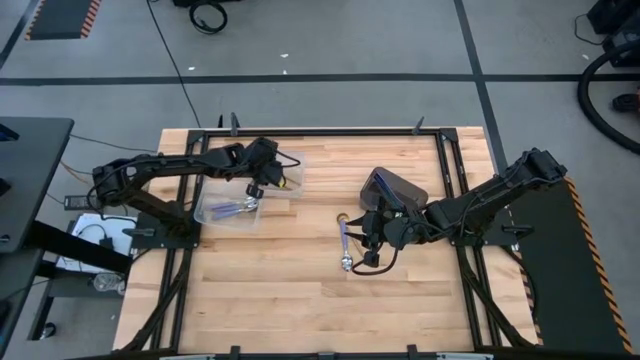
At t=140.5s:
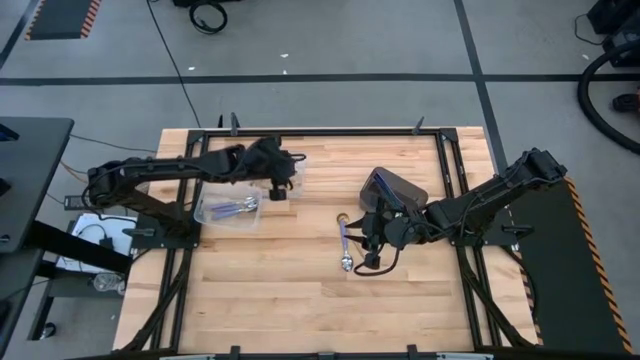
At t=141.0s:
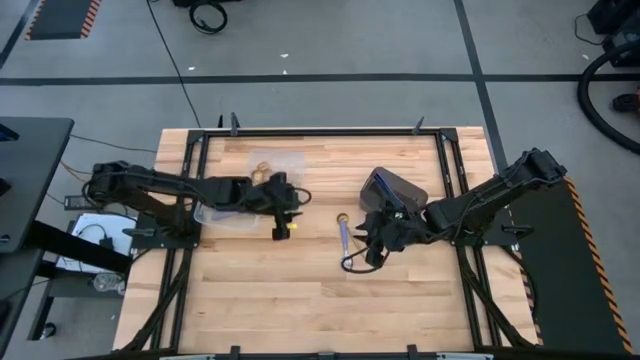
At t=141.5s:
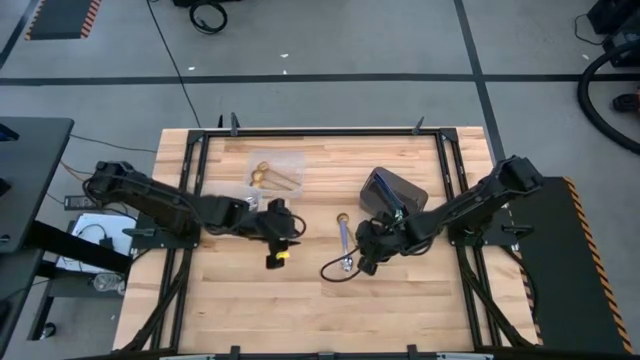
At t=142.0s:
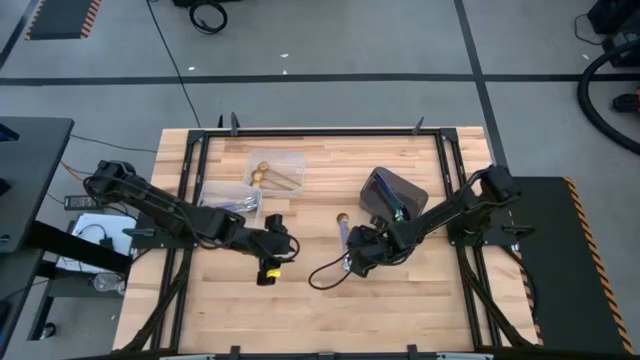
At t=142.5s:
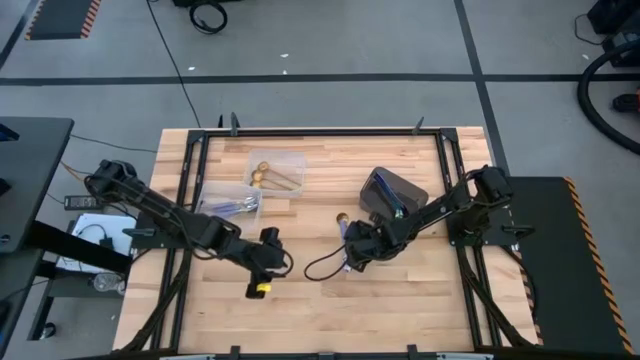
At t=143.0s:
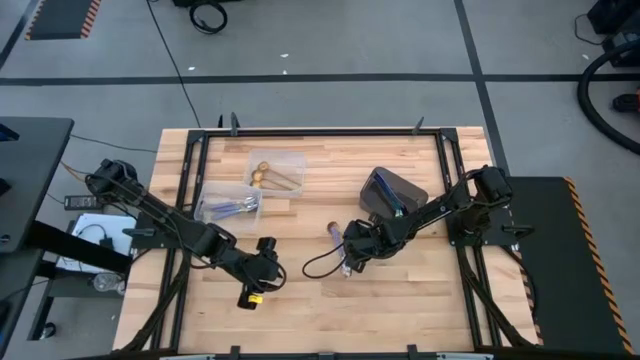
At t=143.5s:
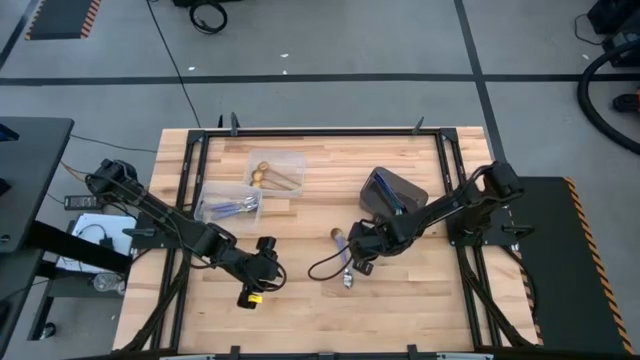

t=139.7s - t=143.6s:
Task: Sort silverware by color (type)
Put the gold spoon into the top transparent bin

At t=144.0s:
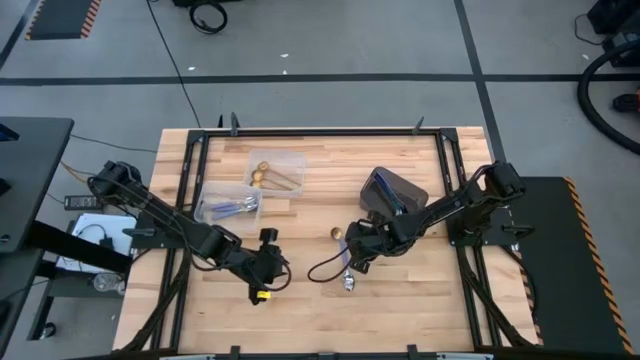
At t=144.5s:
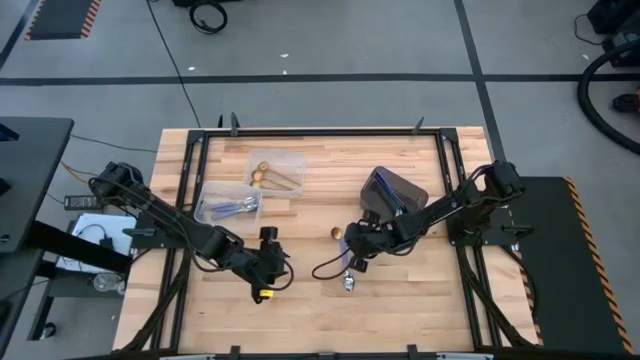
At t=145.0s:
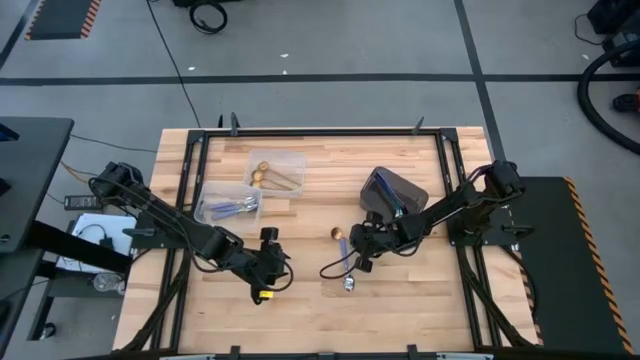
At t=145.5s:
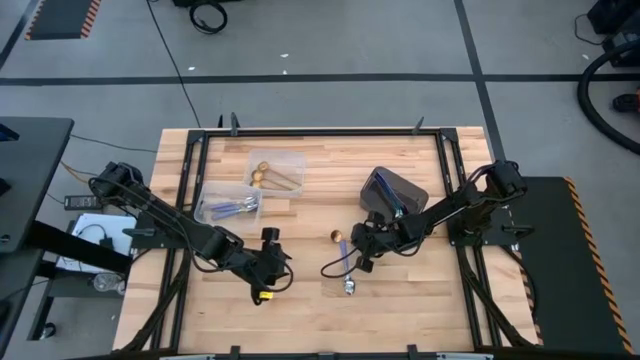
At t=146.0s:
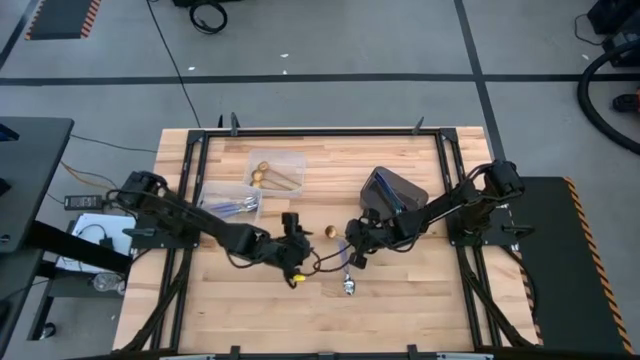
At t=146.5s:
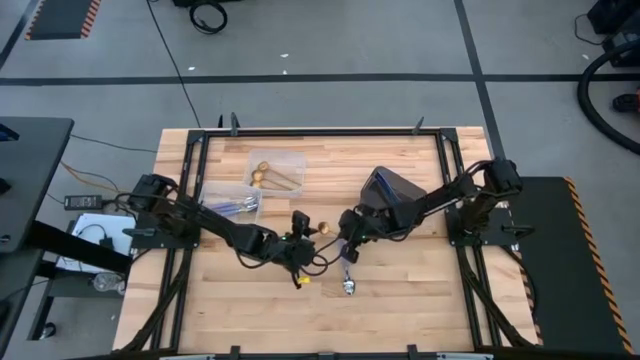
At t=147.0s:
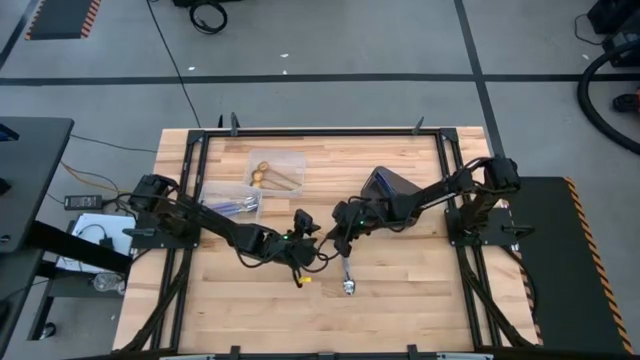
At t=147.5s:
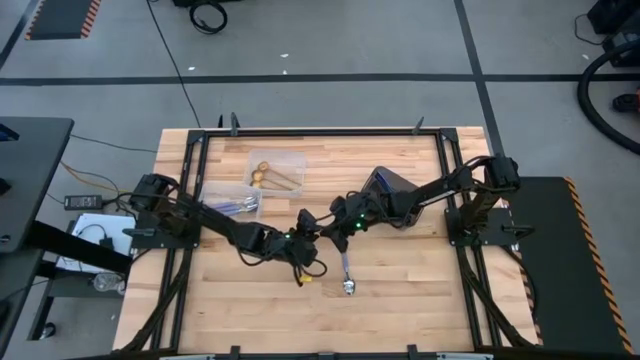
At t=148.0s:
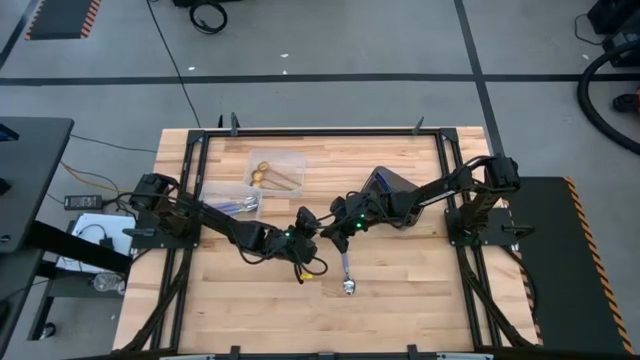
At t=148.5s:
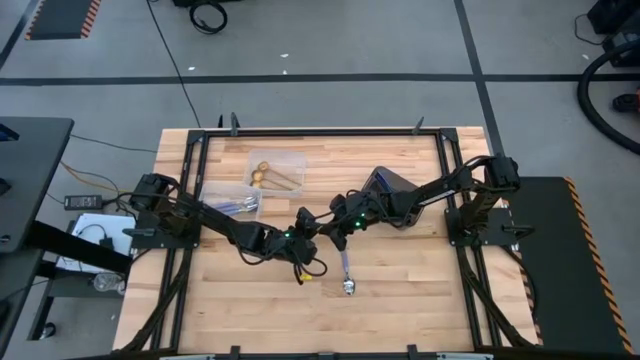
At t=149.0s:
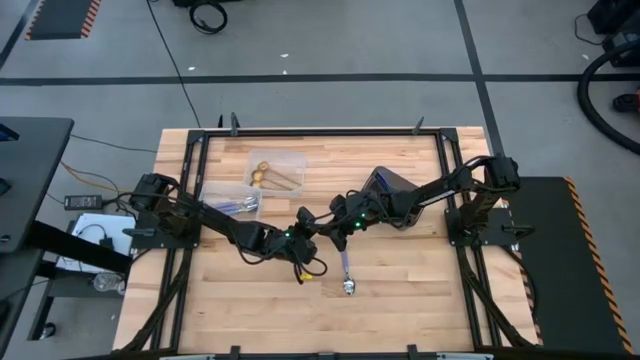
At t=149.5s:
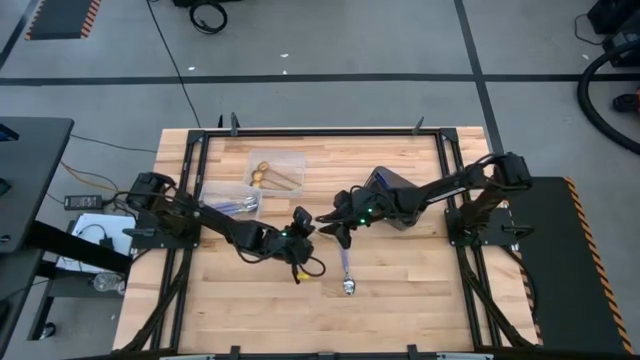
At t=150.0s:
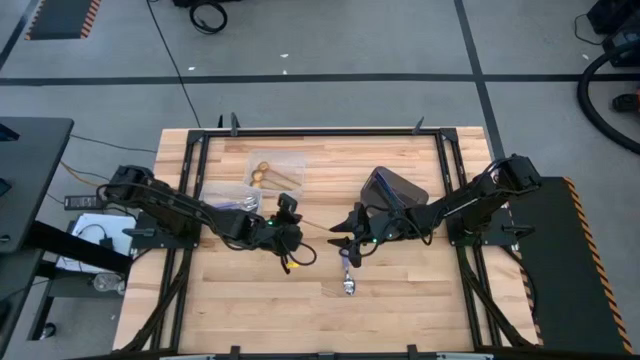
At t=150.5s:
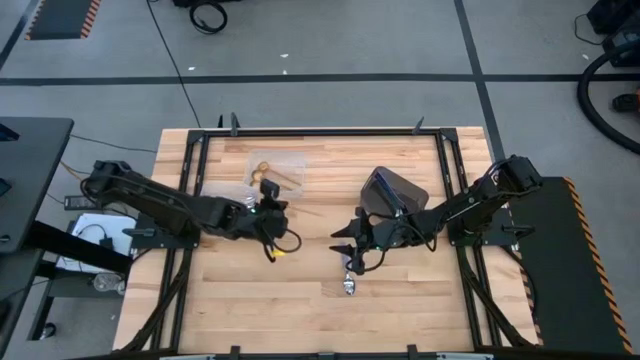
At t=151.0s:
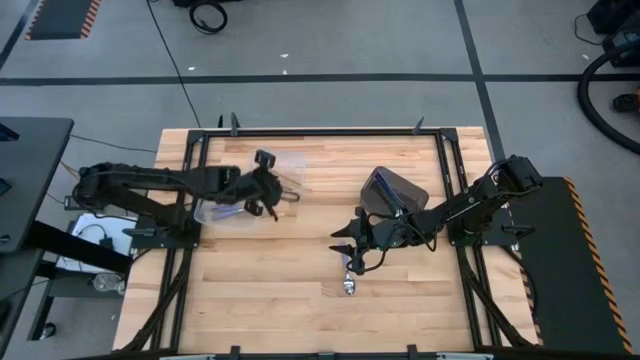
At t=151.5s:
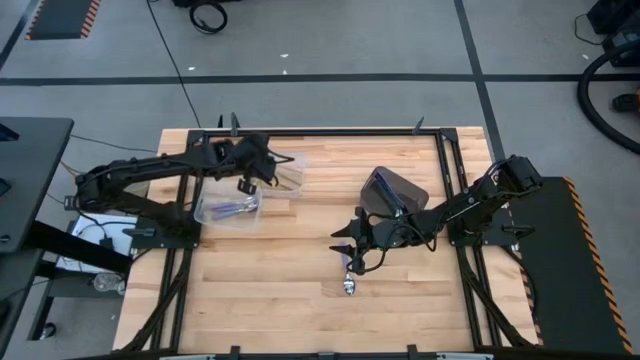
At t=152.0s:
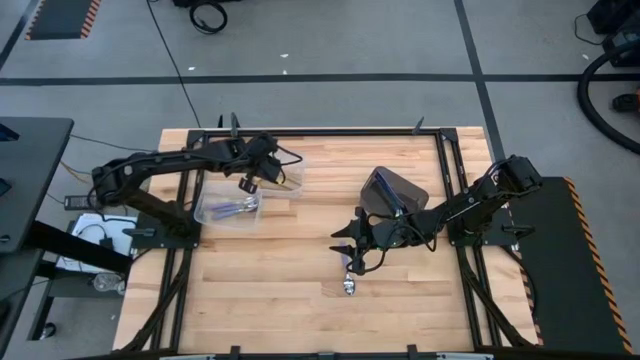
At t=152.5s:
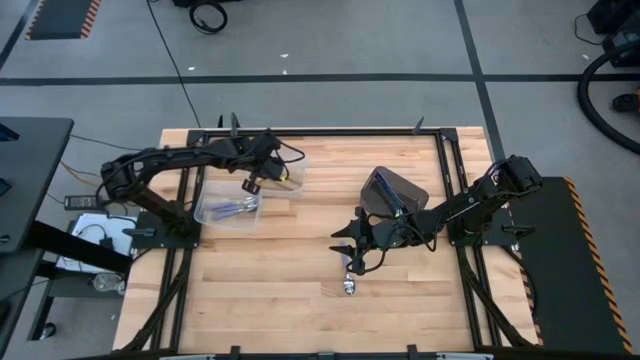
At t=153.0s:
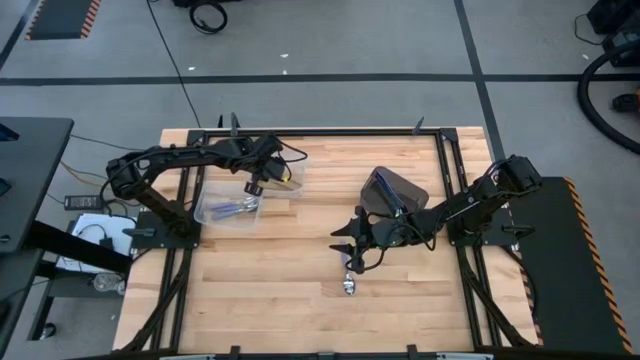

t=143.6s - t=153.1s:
Put the gold spoon into the top transparent bin

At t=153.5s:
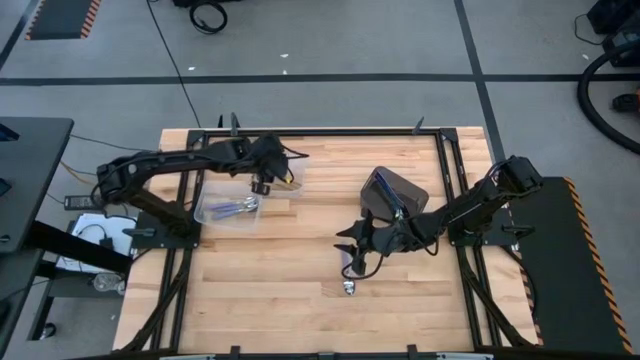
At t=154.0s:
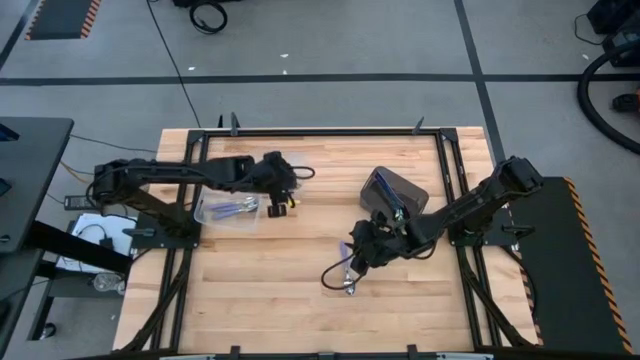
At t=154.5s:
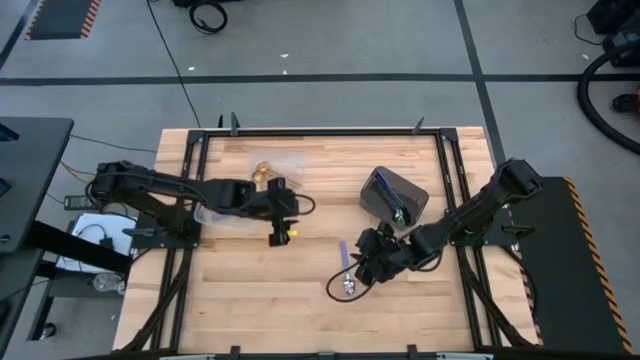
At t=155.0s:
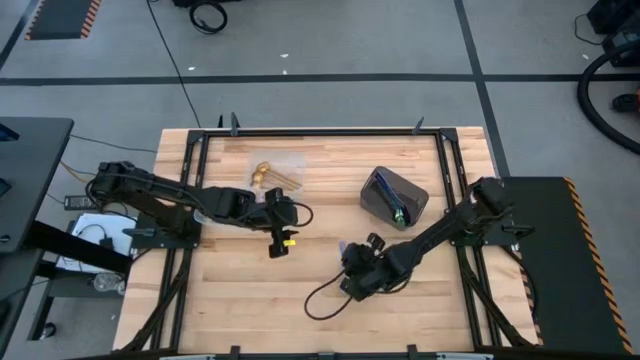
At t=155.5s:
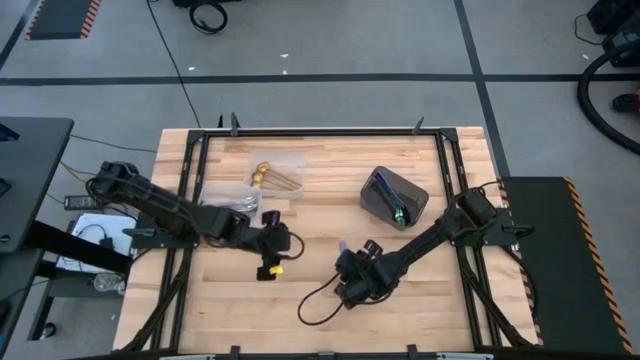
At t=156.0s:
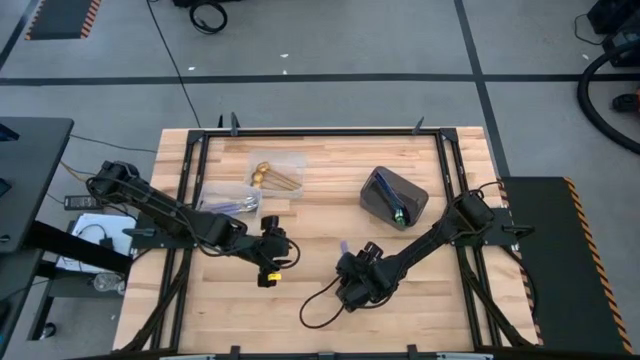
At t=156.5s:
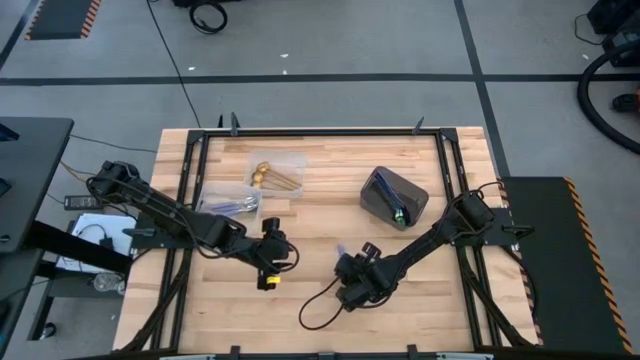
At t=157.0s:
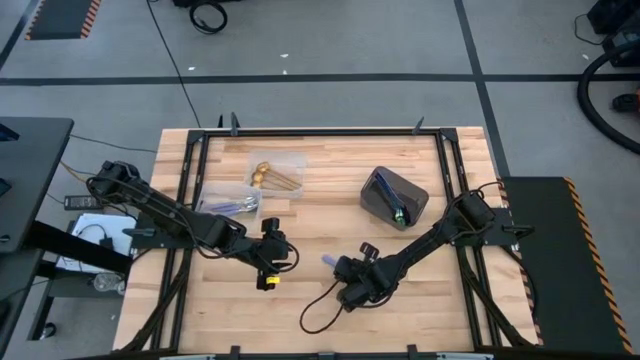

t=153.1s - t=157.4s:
Put the blue spoon into the bottom transparent bin

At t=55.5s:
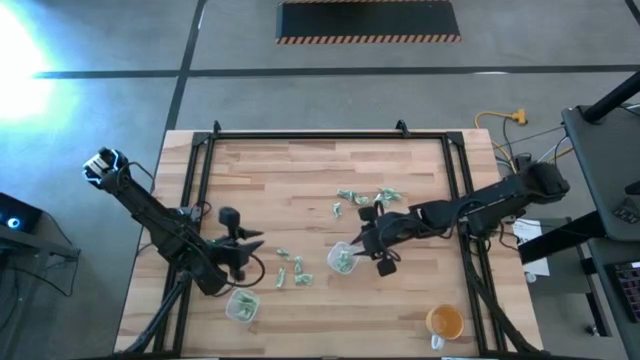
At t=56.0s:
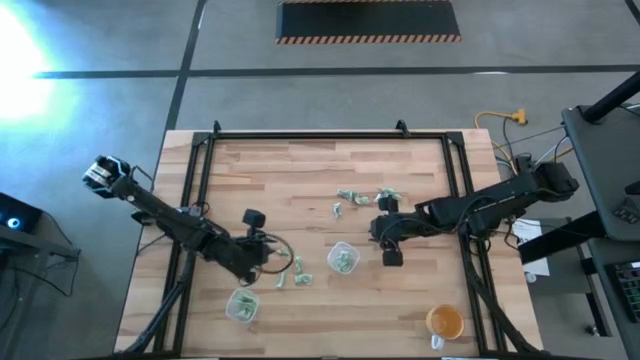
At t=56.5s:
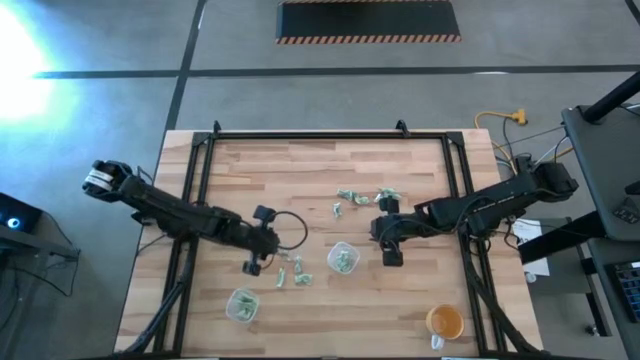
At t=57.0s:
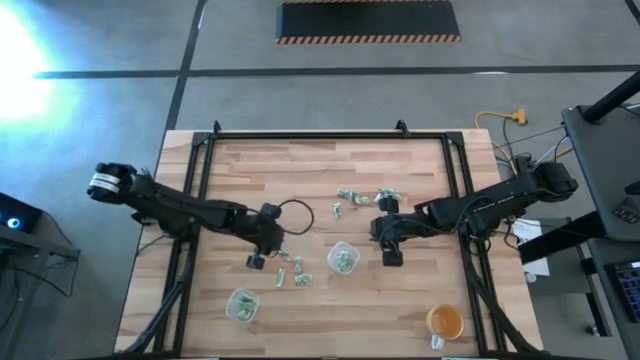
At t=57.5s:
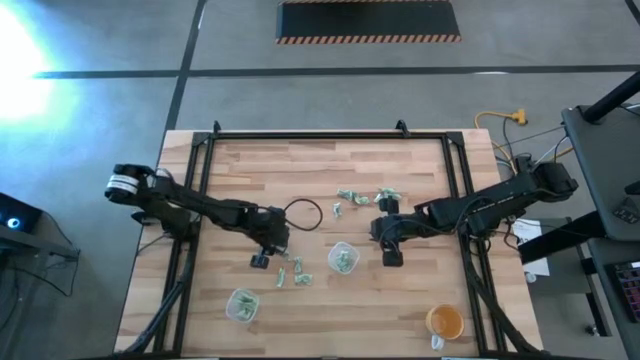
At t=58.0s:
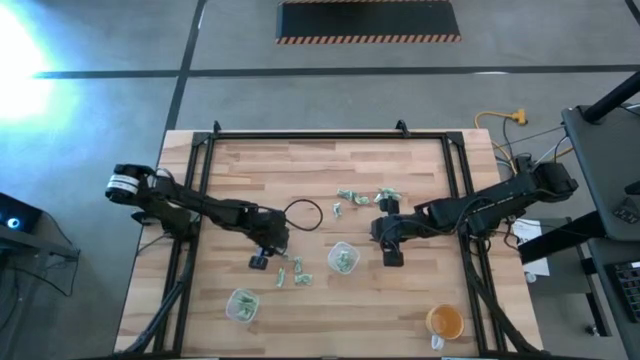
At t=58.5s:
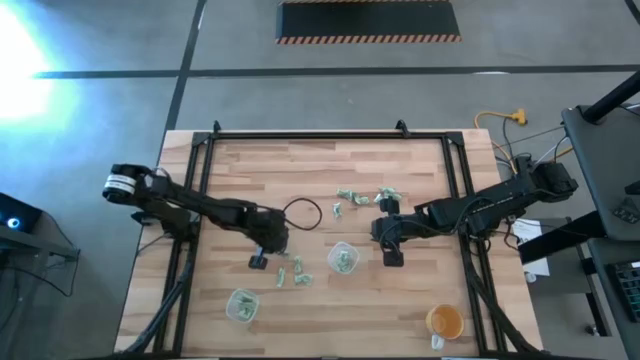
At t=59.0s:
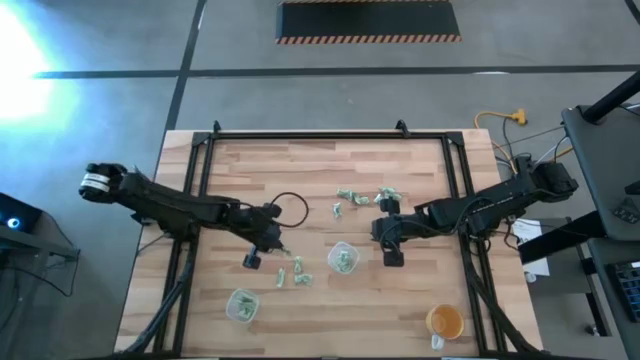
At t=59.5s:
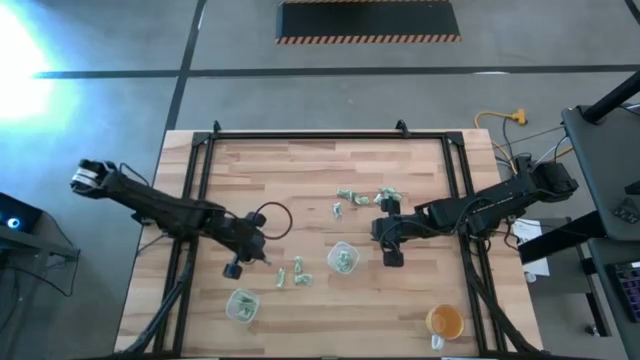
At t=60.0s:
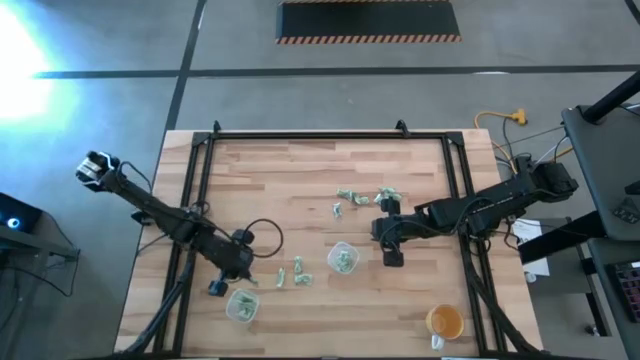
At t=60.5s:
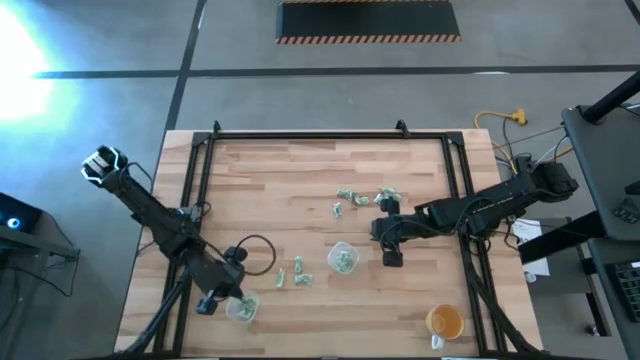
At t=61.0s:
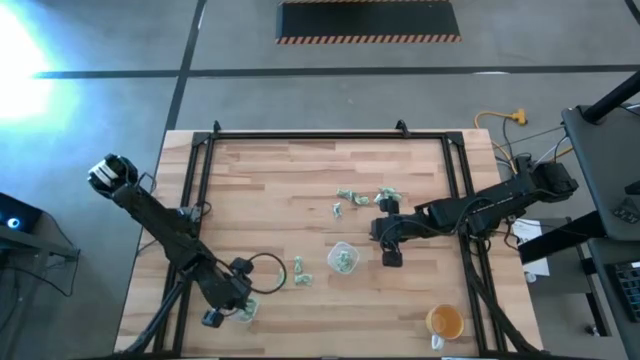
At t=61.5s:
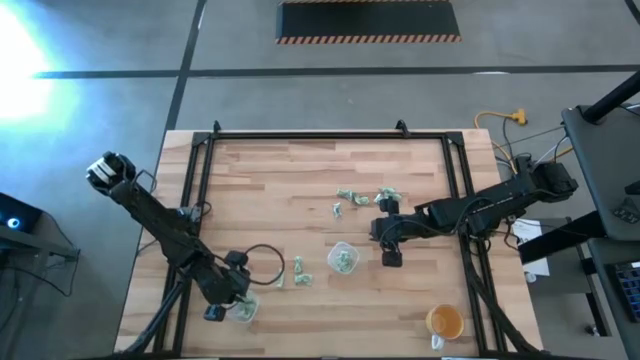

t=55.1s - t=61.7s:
Task: Pick and place items into bin
Put the light green packet into the bottom transparent bin
